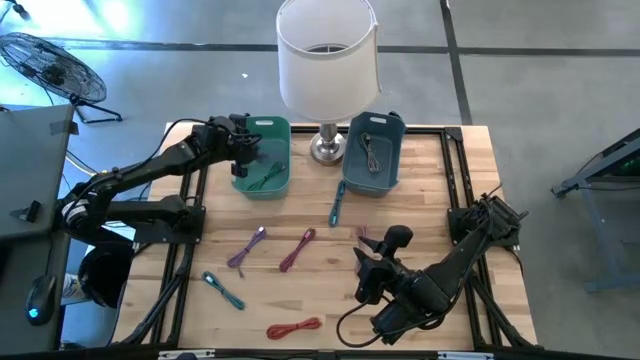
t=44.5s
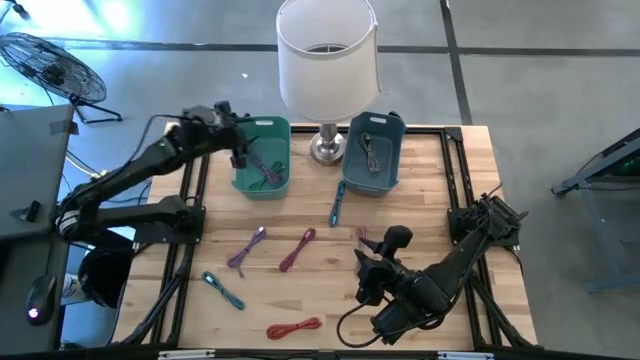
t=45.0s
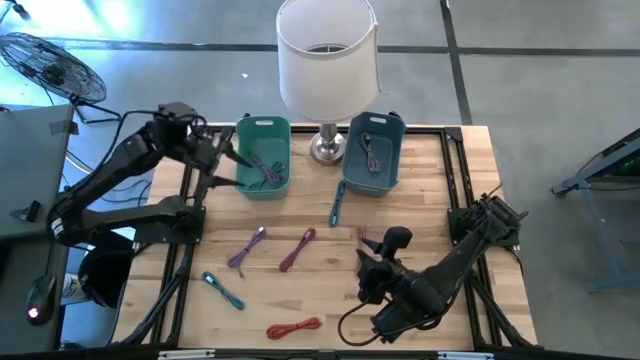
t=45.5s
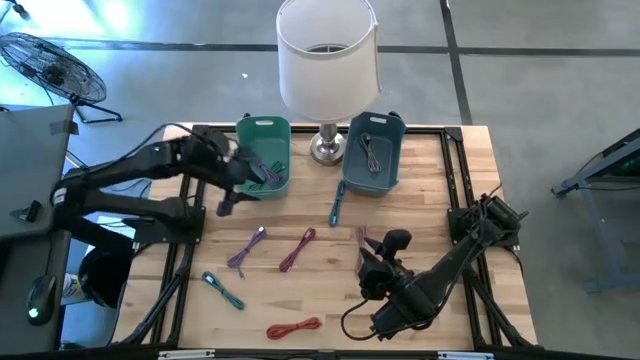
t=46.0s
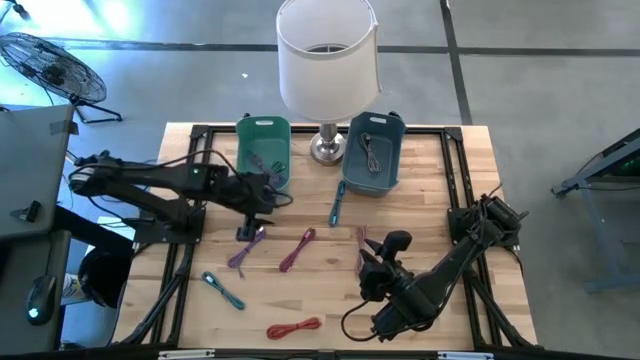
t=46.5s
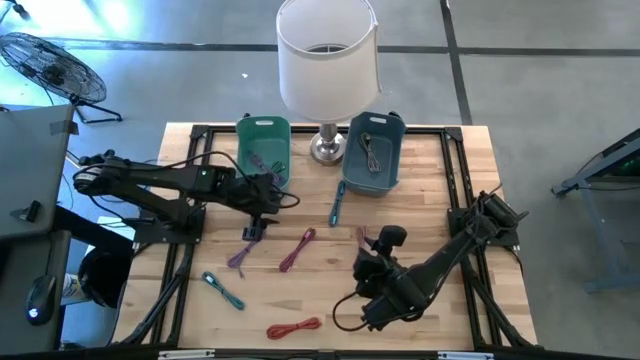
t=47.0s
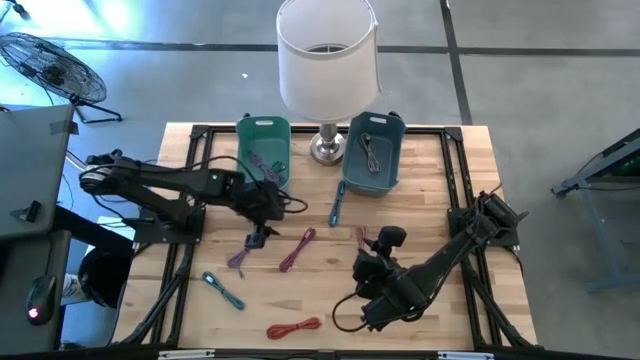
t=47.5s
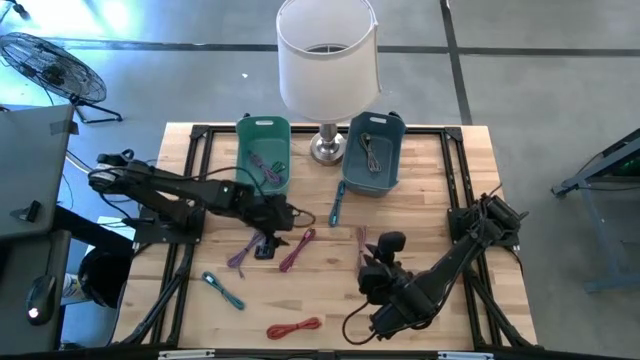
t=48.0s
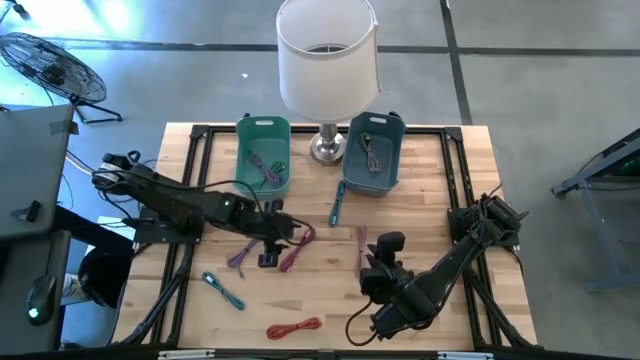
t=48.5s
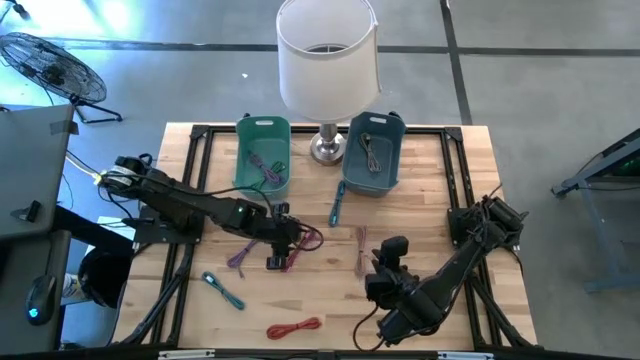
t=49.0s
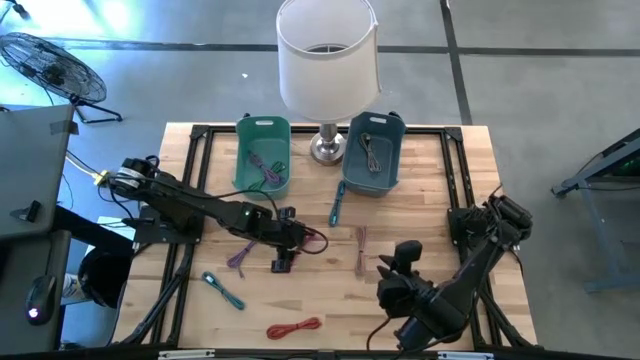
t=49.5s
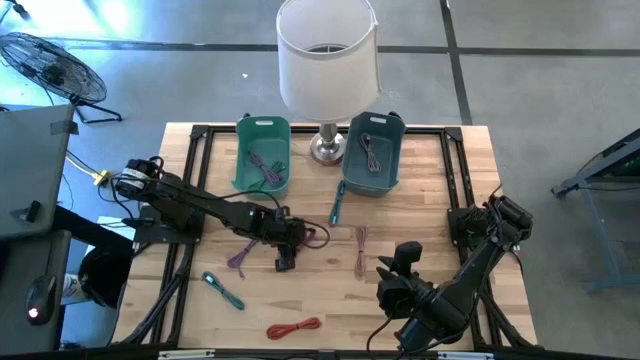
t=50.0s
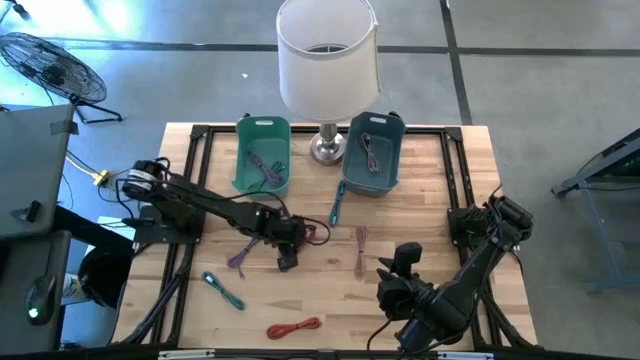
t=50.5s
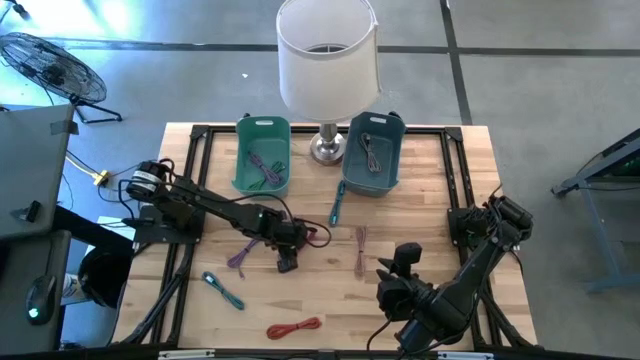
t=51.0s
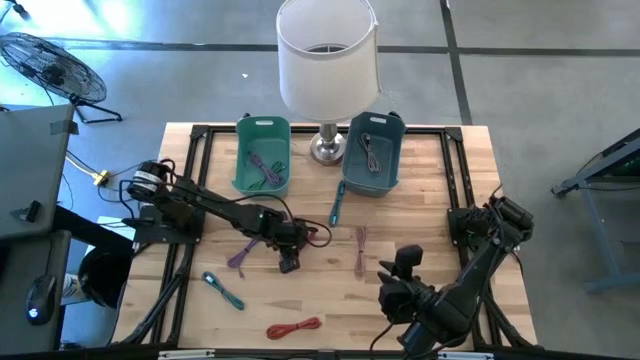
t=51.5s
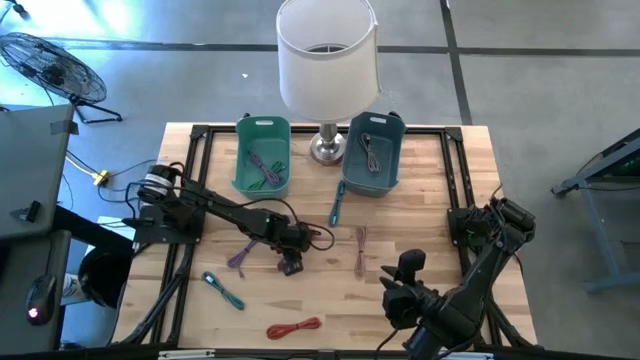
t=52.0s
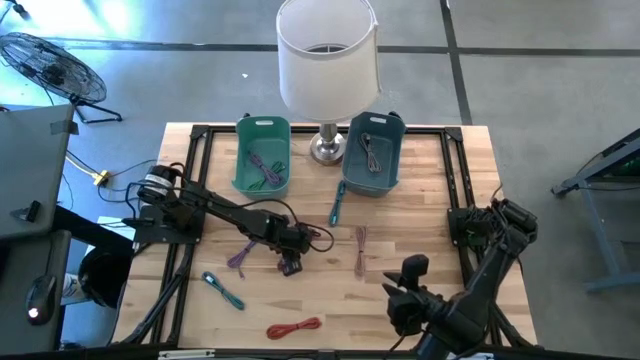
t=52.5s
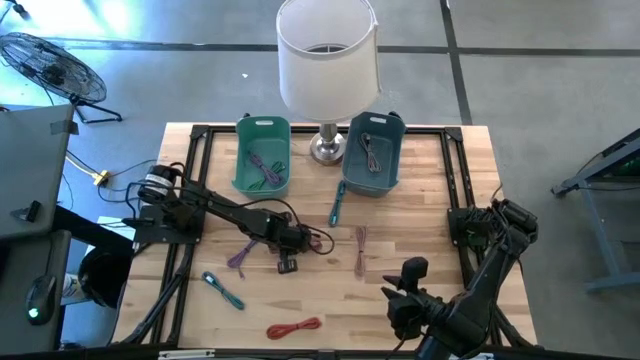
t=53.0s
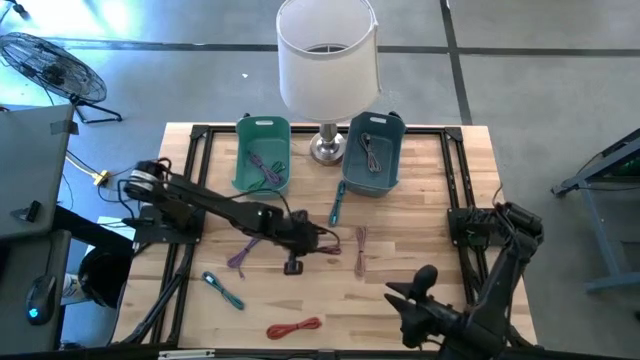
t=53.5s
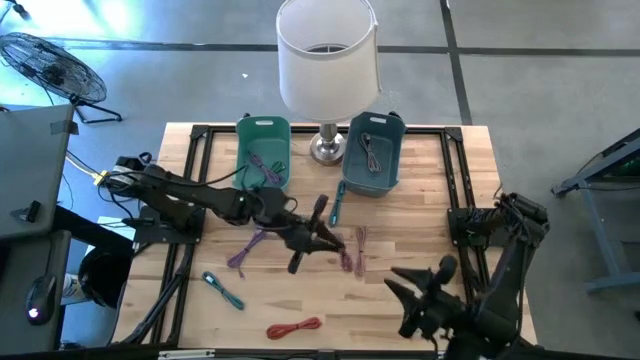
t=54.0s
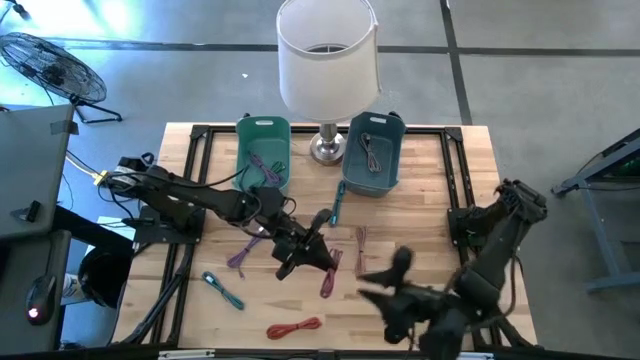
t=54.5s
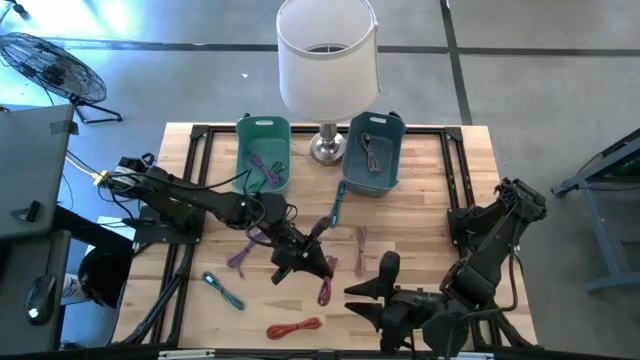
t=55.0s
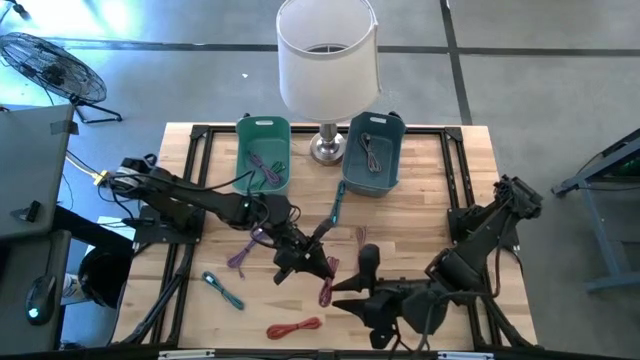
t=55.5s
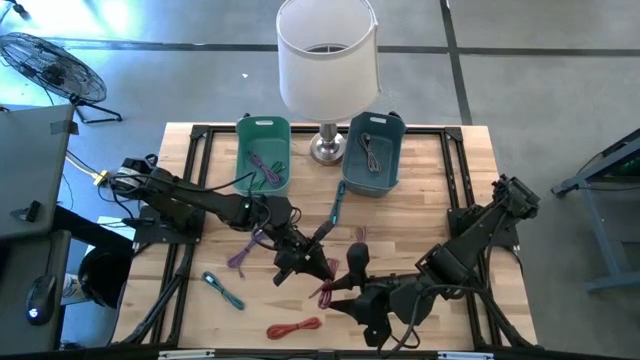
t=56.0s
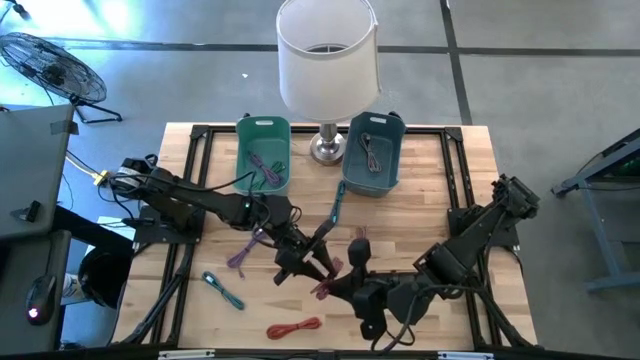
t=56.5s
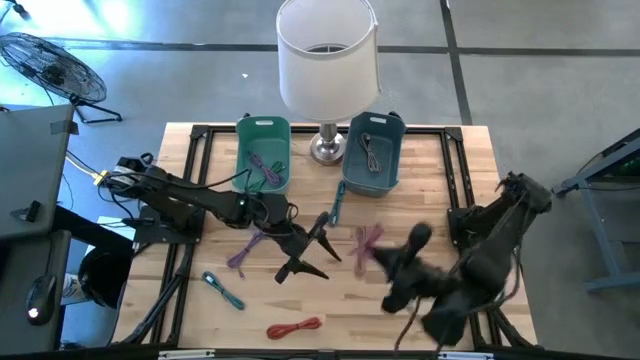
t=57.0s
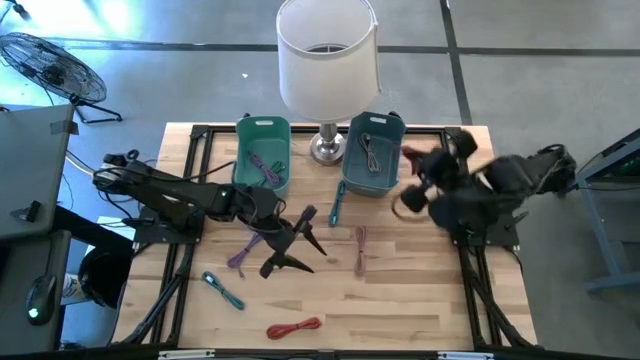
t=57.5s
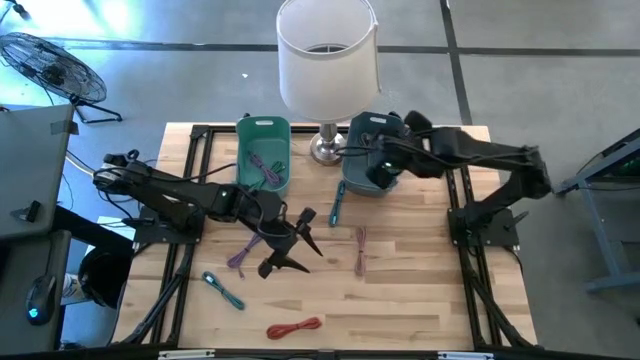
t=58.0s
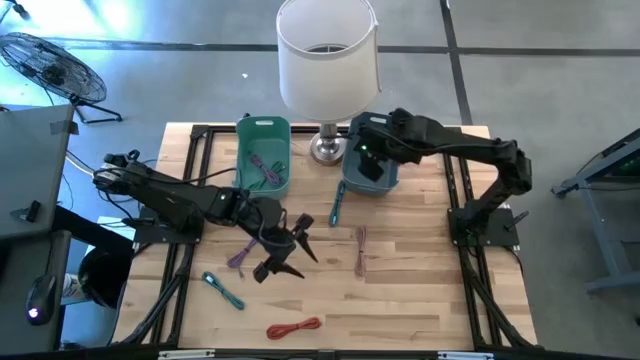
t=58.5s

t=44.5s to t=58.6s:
Task: Pick & Place USB Port
Put the pink patterned charger cable into the blue bin

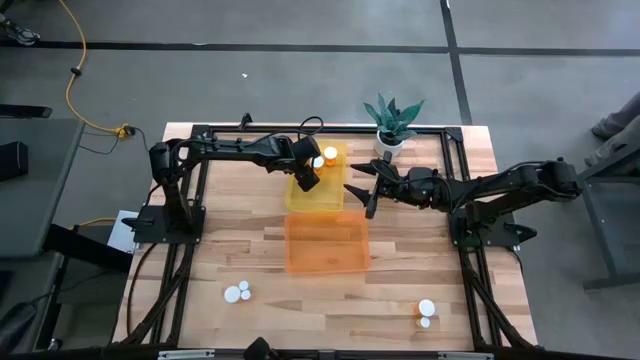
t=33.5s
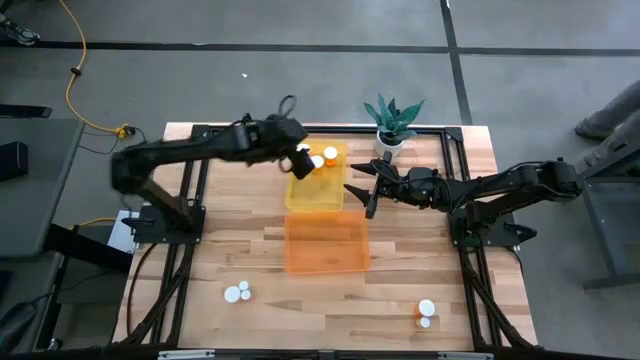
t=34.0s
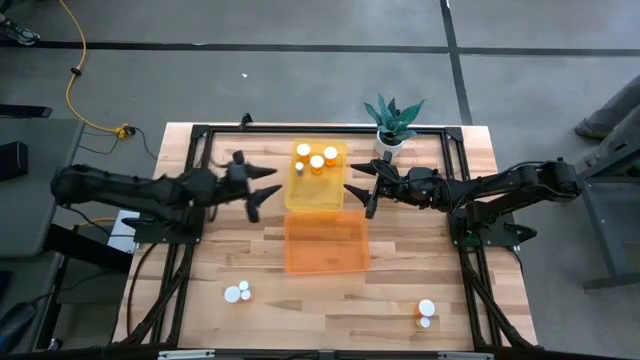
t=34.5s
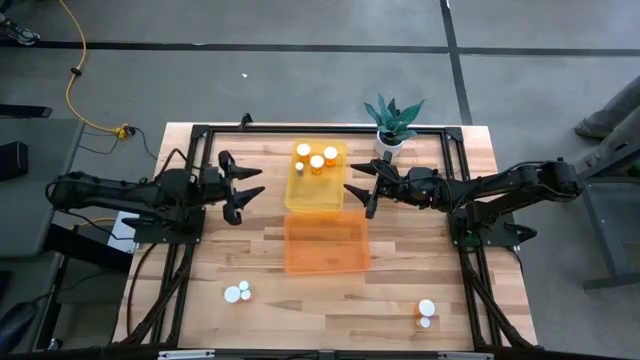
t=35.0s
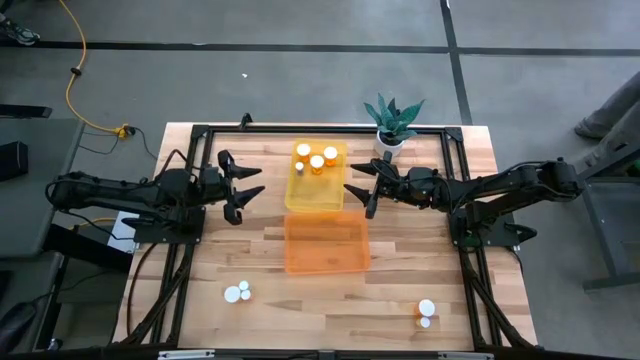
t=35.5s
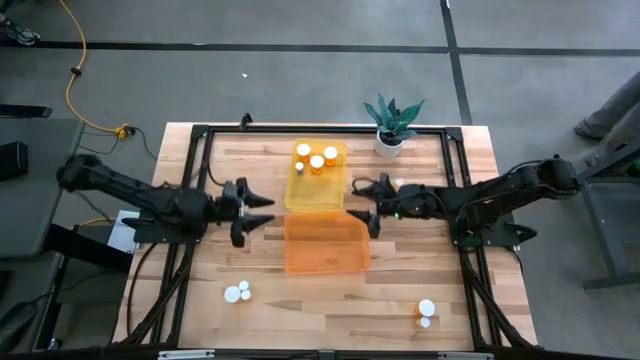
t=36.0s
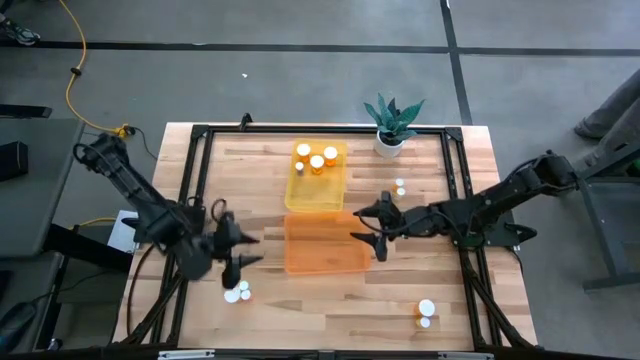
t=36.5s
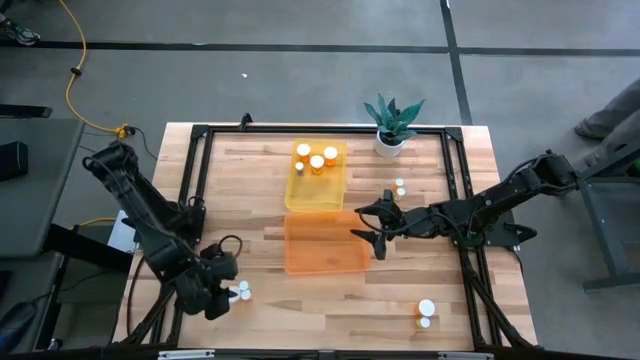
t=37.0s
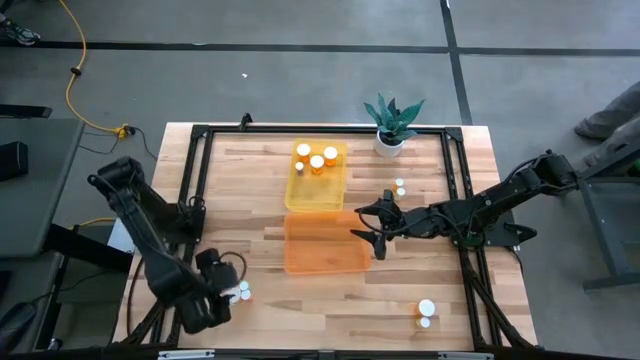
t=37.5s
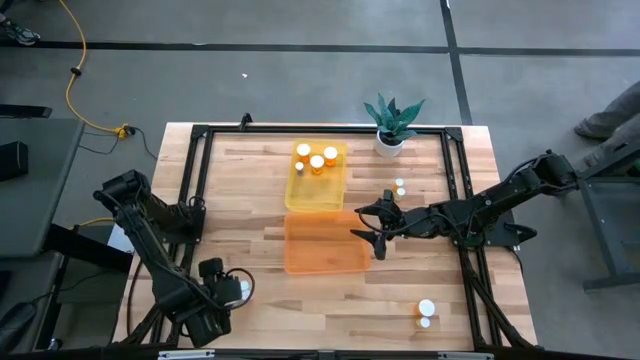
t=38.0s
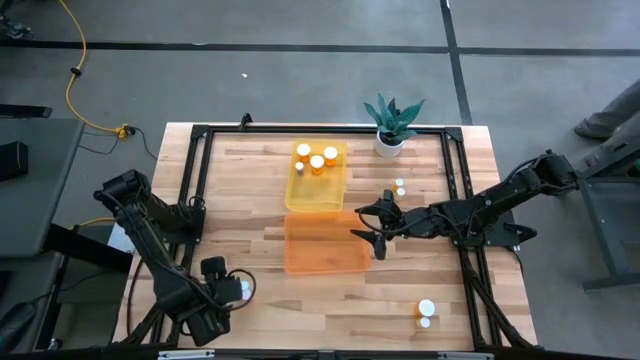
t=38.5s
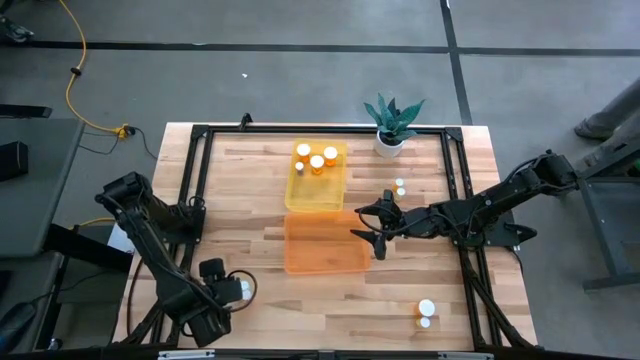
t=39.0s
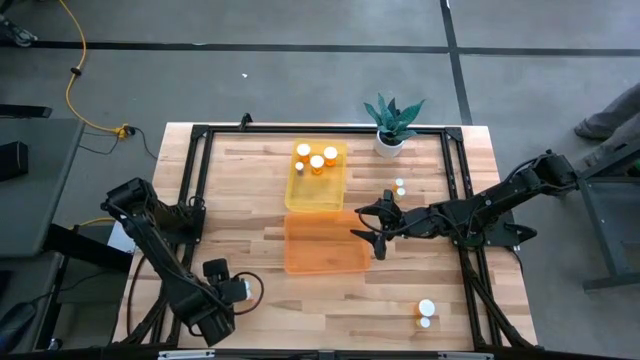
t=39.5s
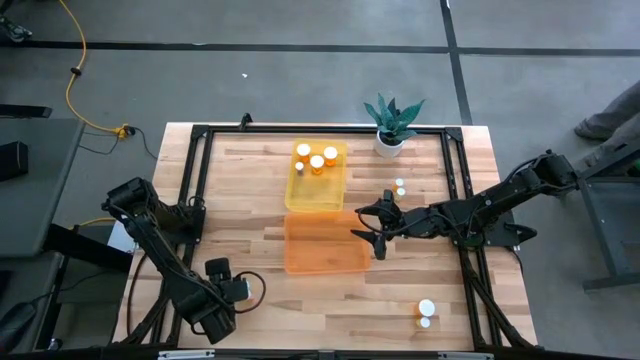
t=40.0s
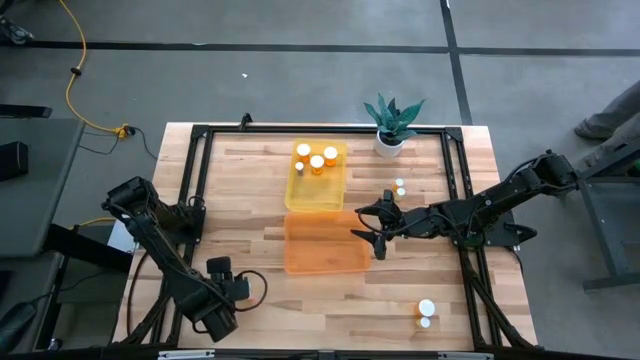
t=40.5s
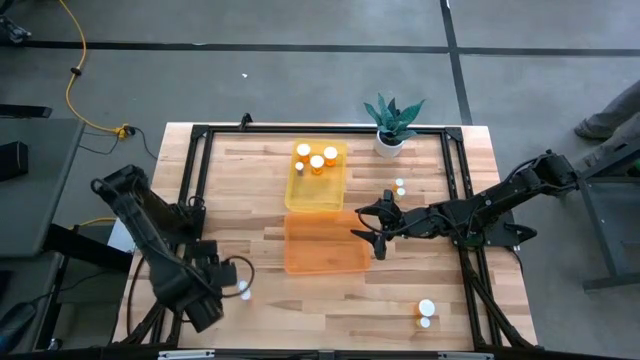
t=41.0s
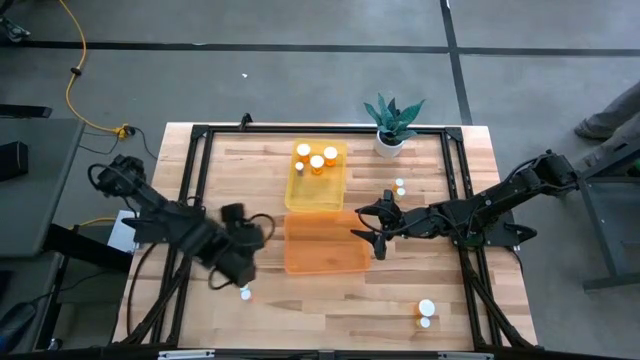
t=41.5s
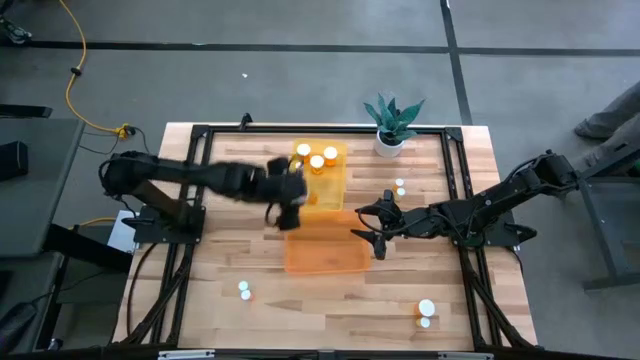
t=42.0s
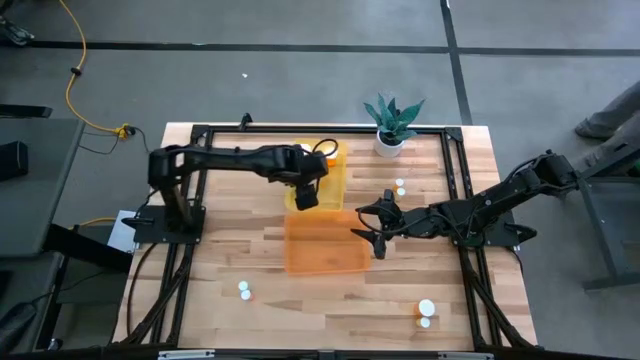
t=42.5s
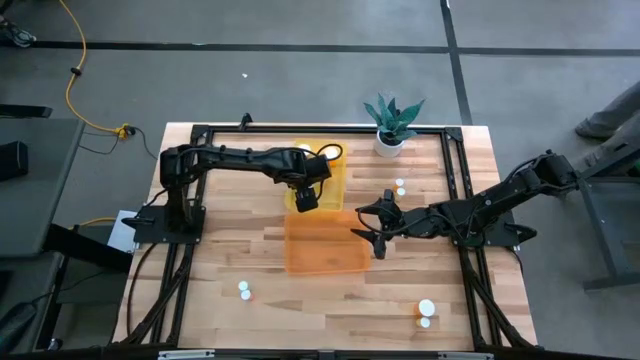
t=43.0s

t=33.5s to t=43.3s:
Task: Pick and place medicine bottles into bin by pill shape (circle, oval)
Put the orange capsule bottle into the yellow bin
